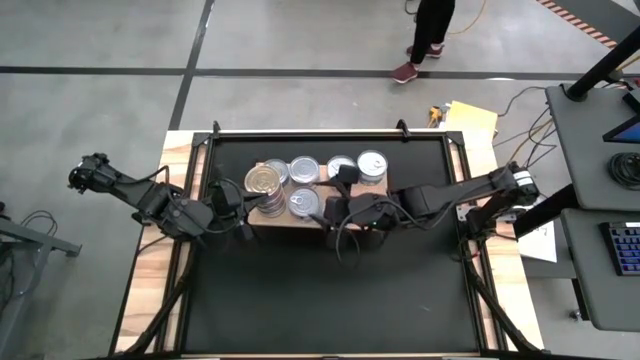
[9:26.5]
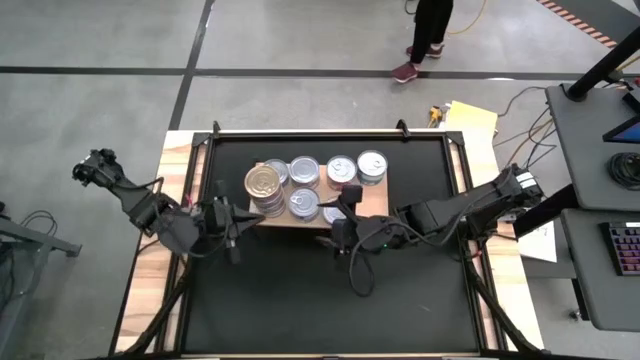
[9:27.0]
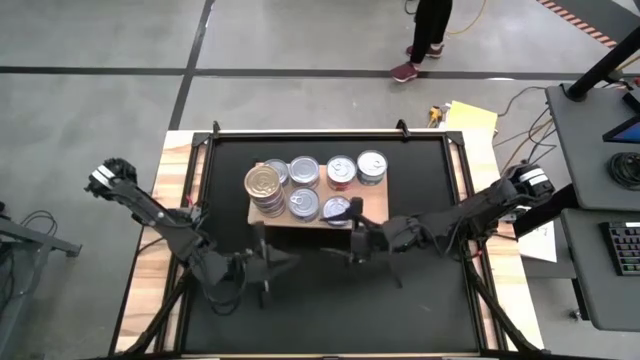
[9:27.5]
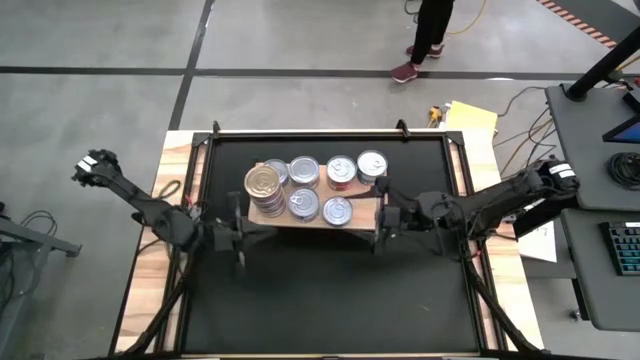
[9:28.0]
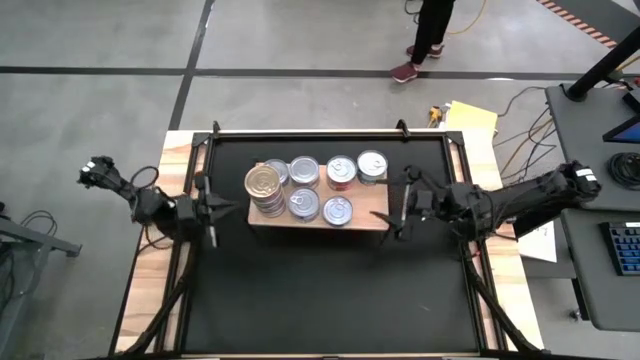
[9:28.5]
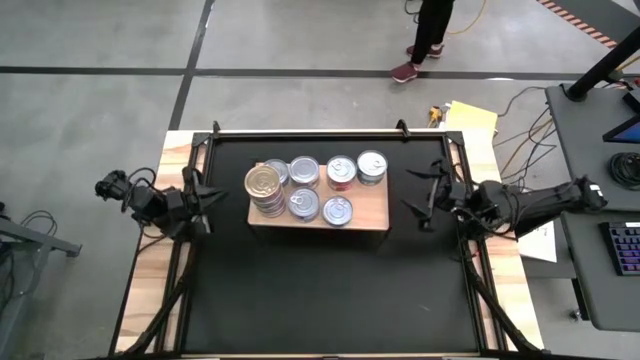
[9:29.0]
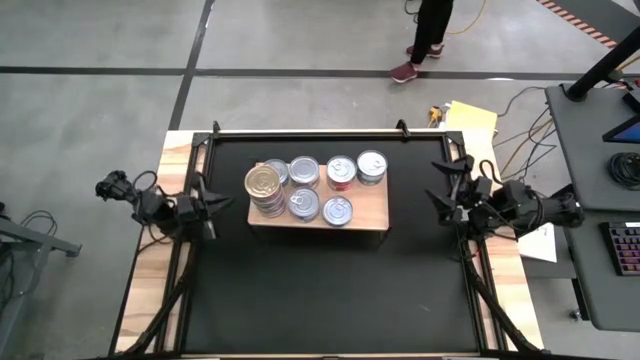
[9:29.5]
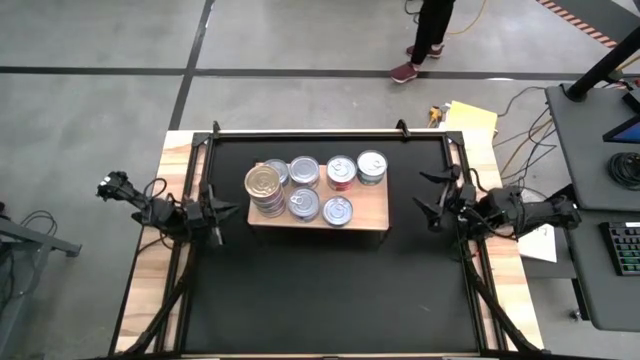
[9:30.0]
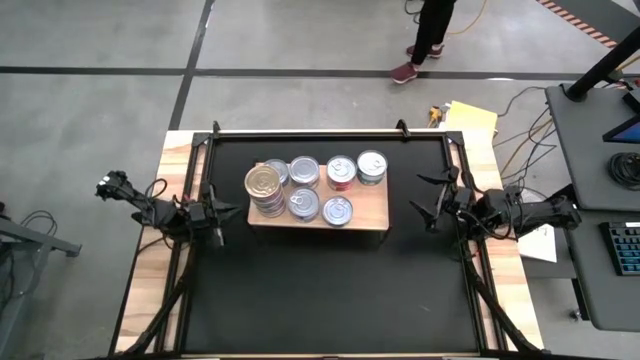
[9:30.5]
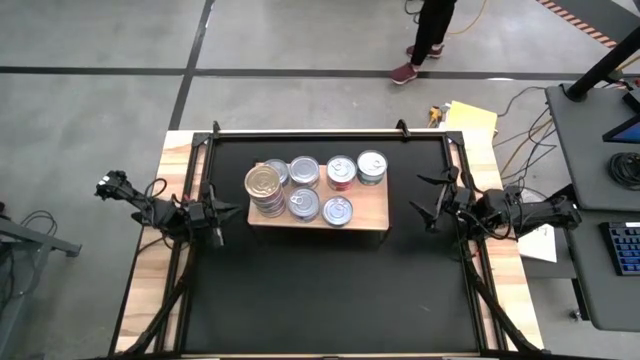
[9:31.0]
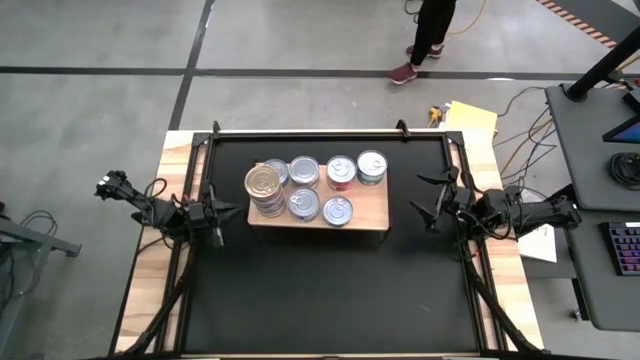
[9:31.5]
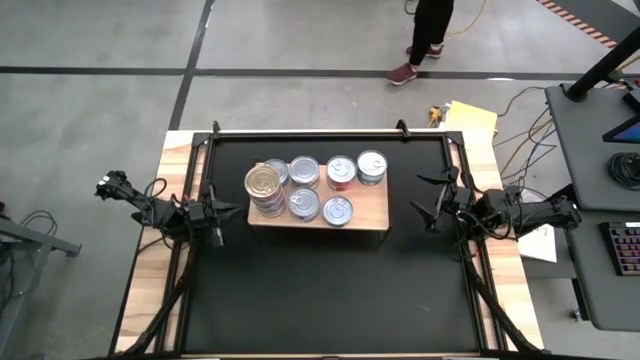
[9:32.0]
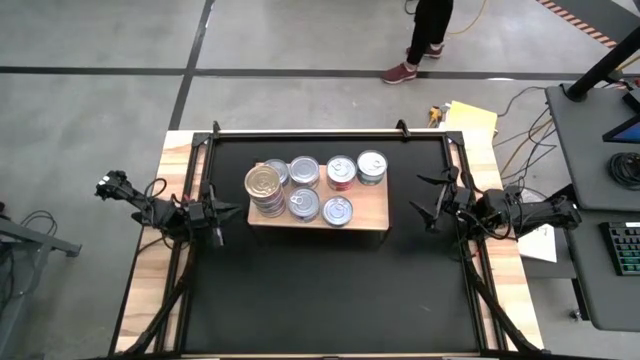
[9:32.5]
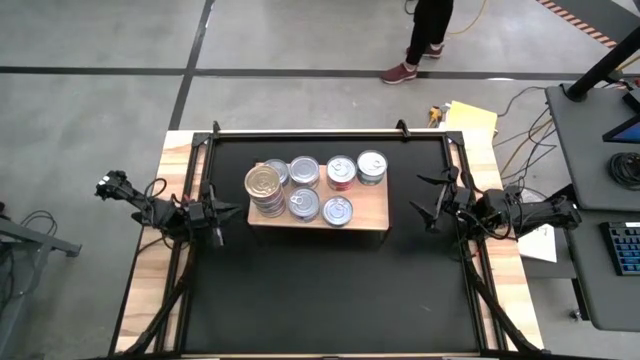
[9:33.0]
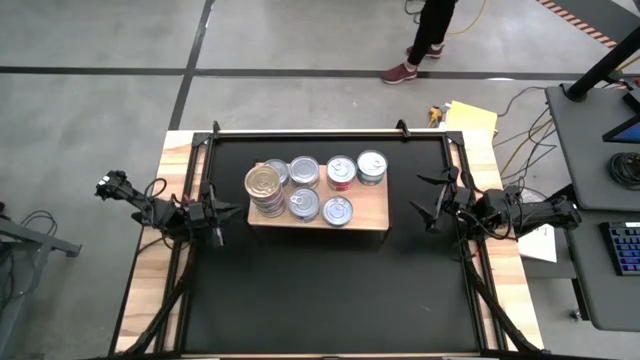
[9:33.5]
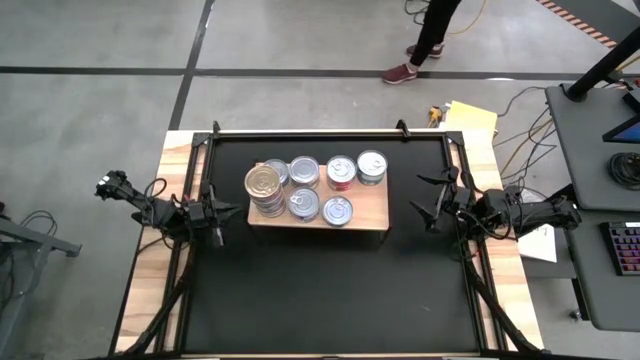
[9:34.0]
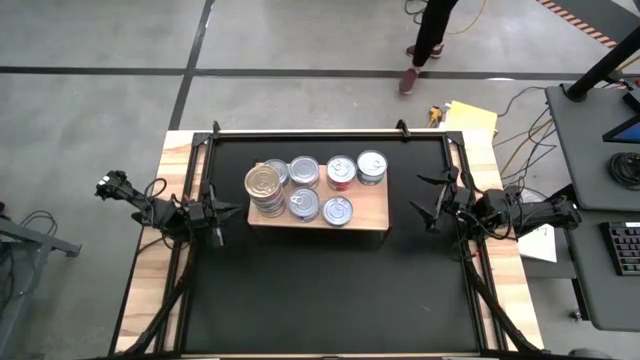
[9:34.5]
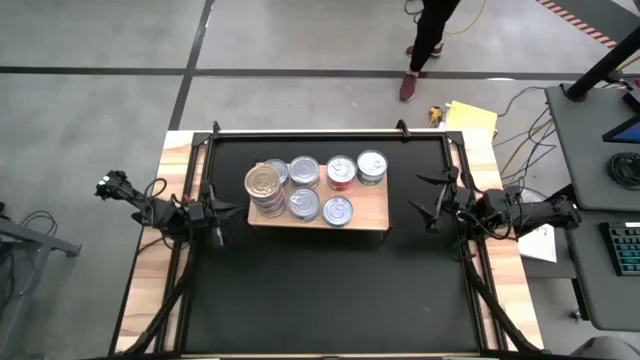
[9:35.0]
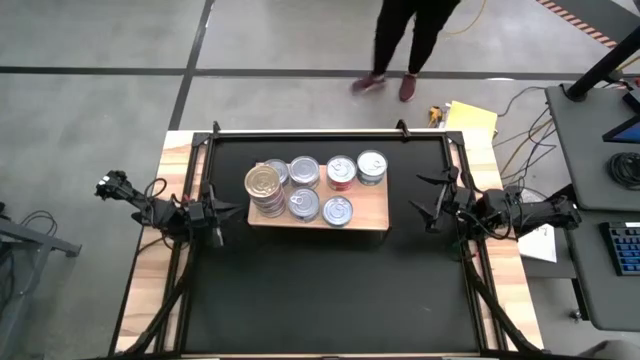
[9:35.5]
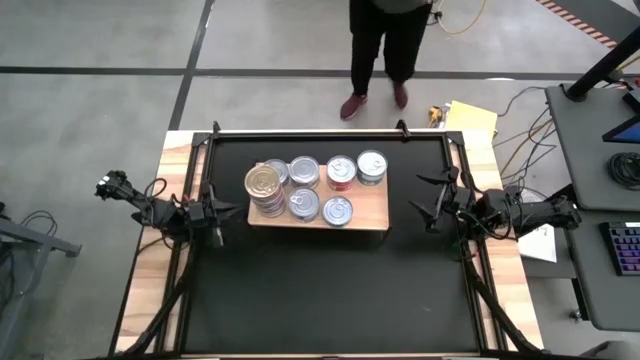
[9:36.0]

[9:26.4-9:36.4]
Task: Stack canned seafood by type on shelf
Return to Home Position

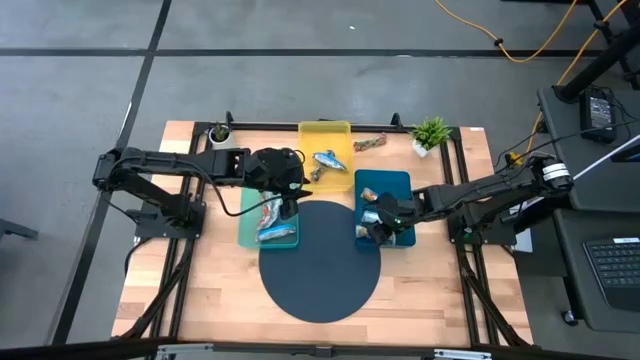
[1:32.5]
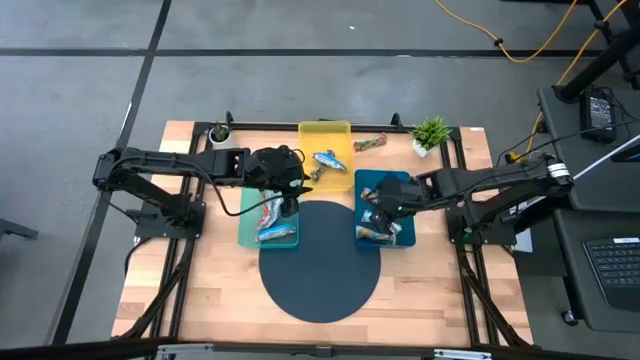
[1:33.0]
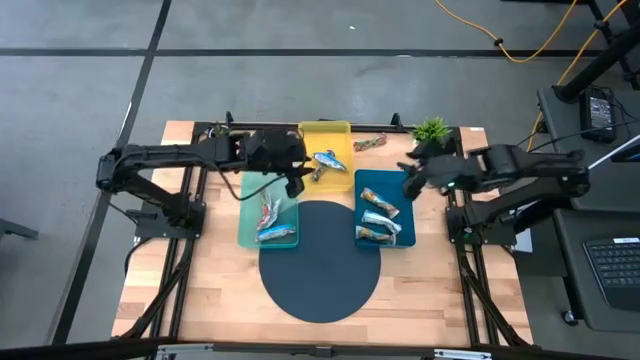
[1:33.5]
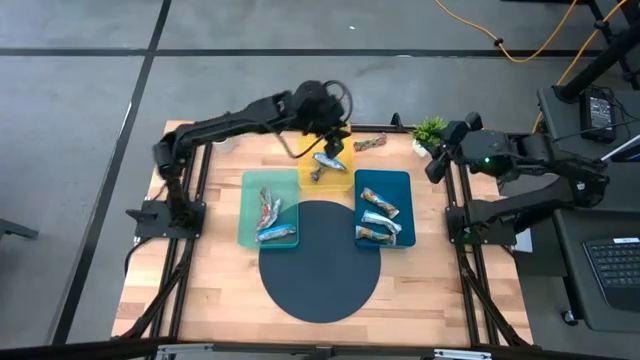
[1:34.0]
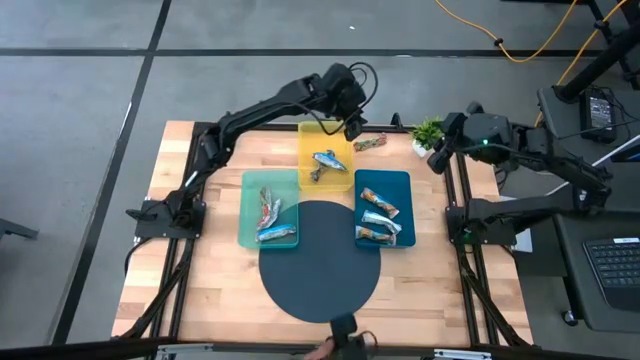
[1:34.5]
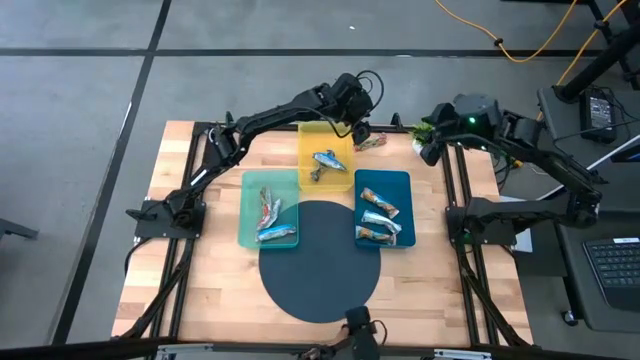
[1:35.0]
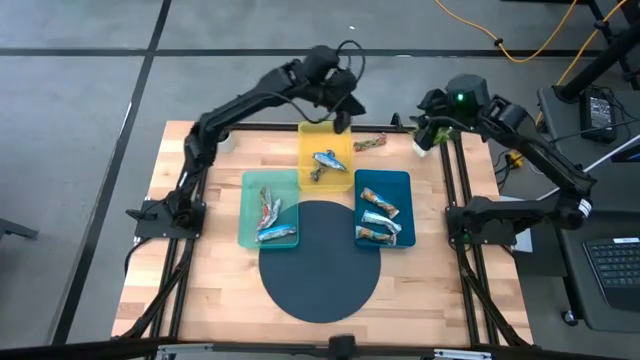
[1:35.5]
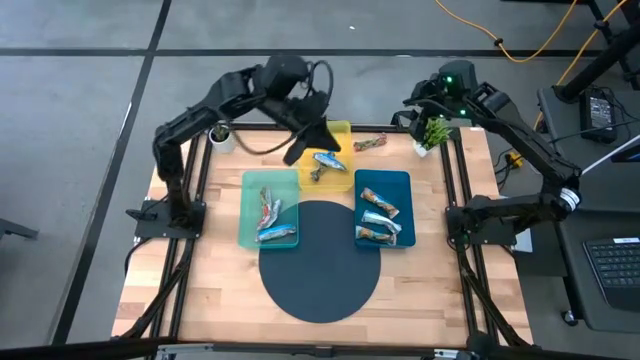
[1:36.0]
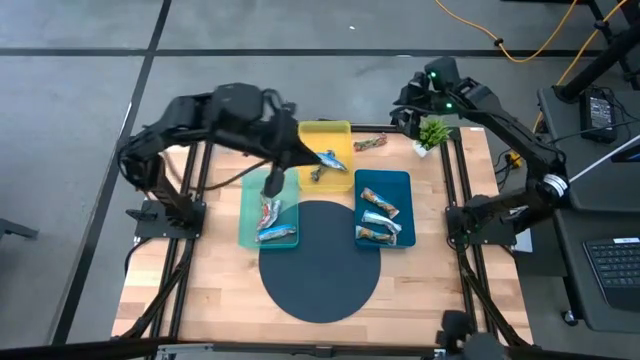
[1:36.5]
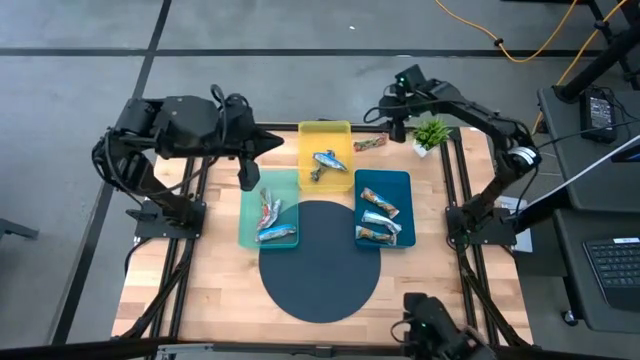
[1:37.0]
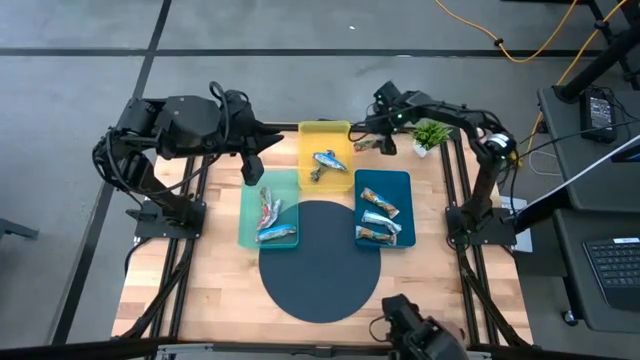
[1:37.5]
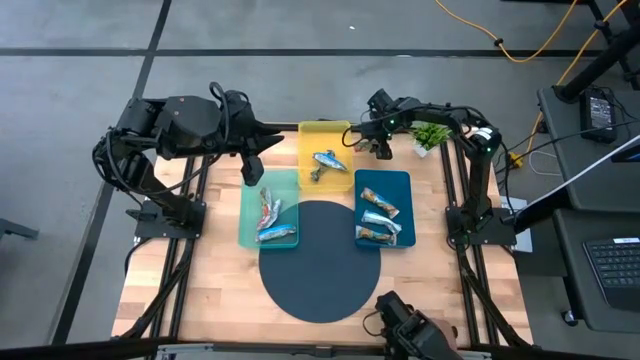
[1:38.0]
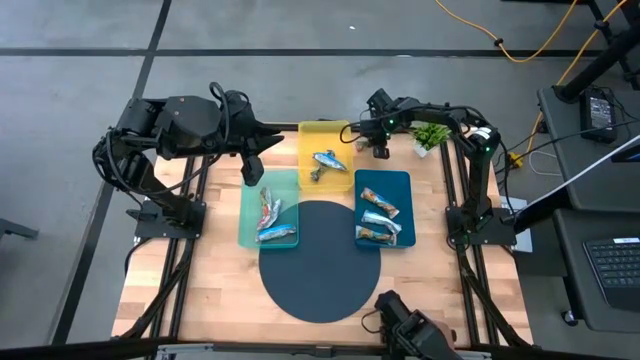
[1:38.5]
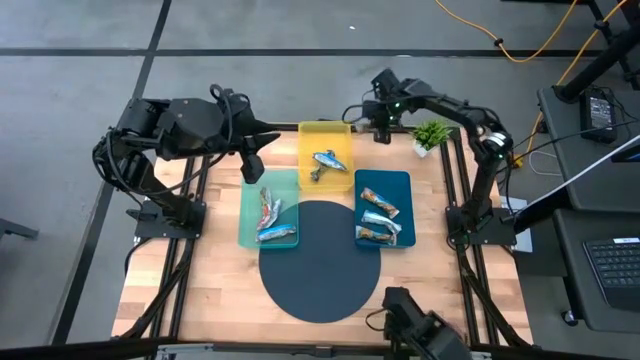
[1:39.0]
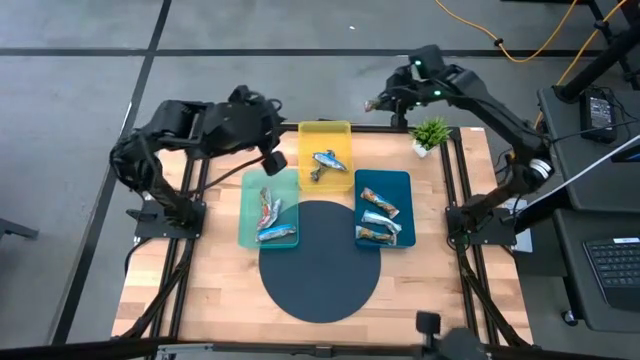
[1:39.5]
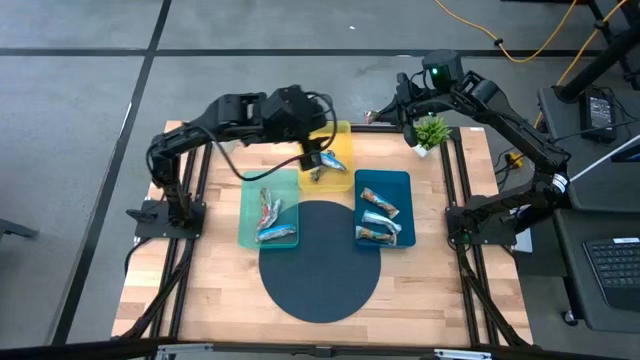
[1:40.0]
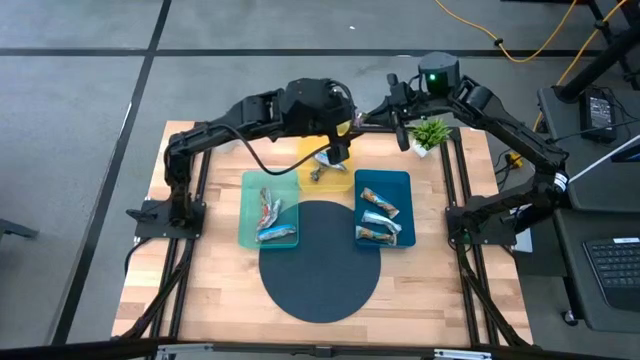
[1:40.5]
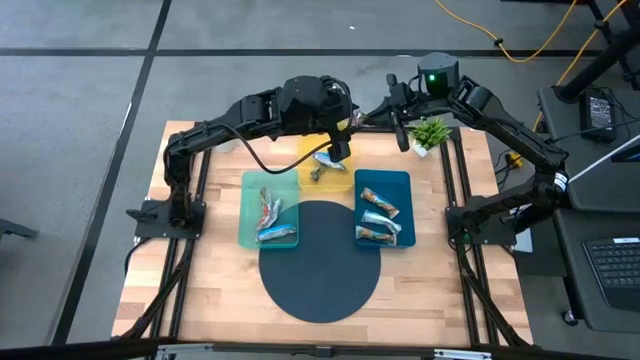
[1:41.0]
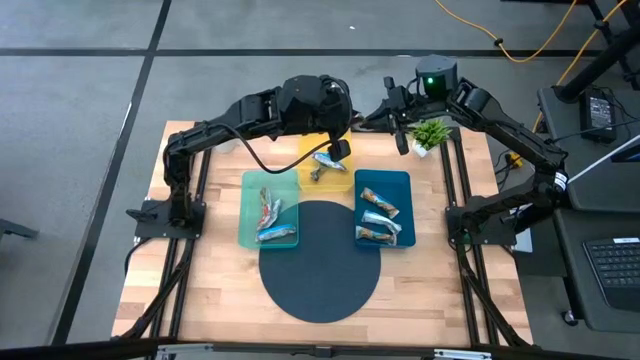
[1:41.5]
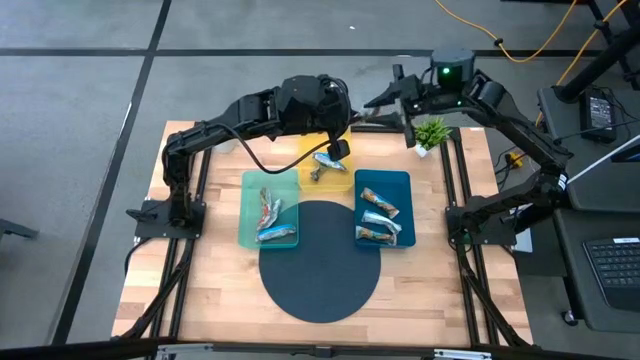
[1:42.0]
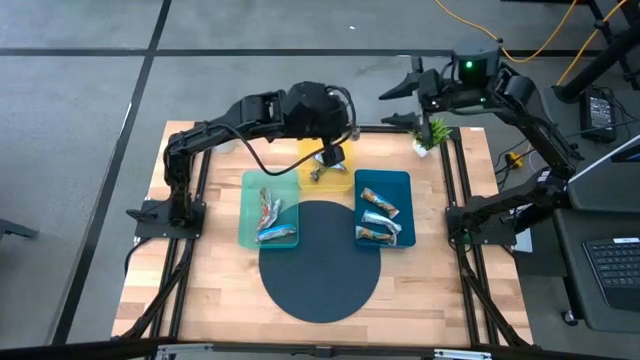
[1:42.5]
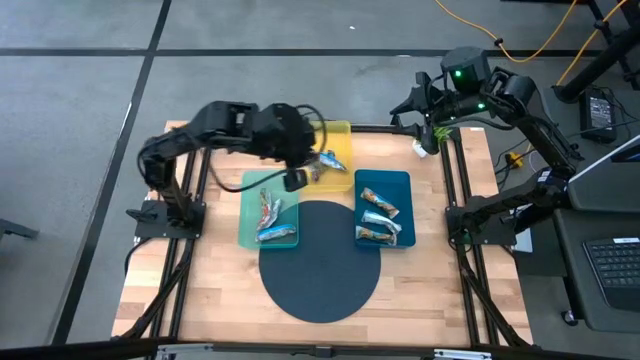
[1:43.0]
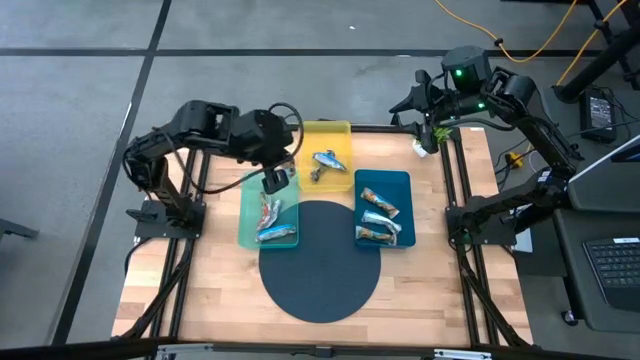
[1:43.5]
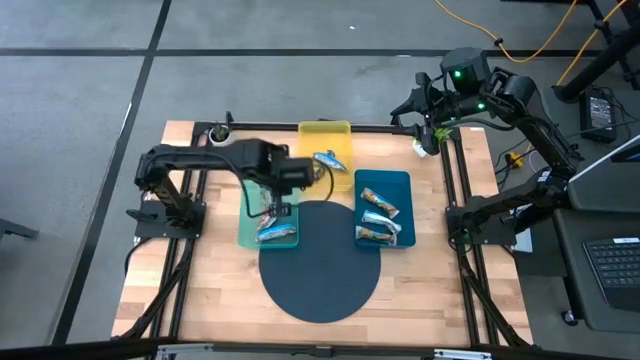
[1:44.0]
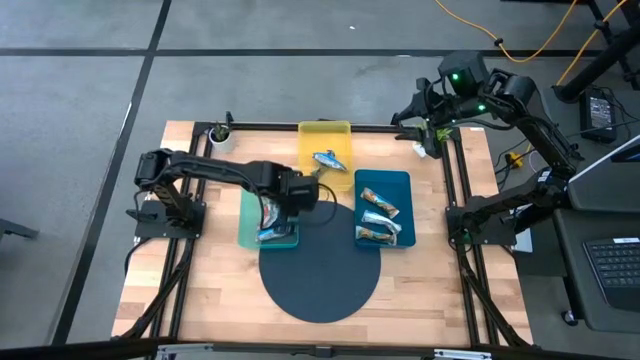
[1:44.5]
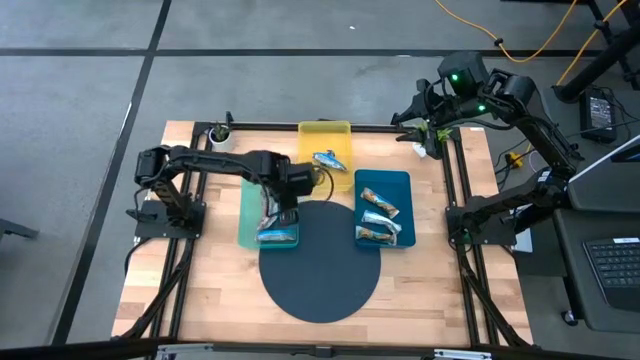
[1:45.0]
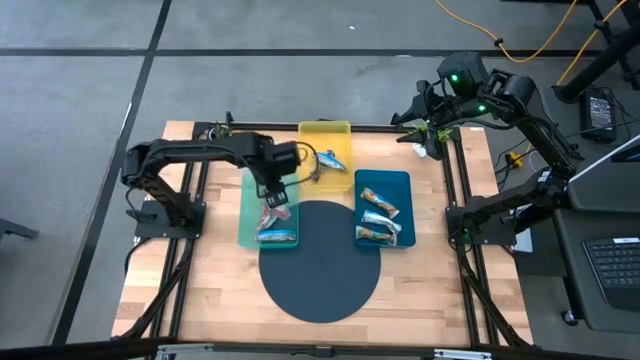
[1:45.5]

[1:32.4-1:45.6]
Task: Pick and place Granola Bars by type
Put the red granola bar into the light blue bin
